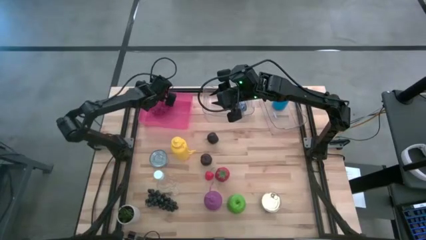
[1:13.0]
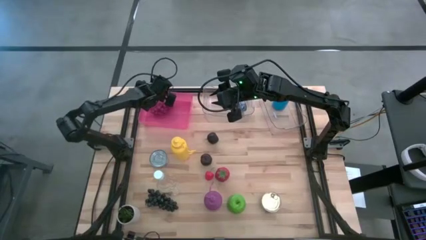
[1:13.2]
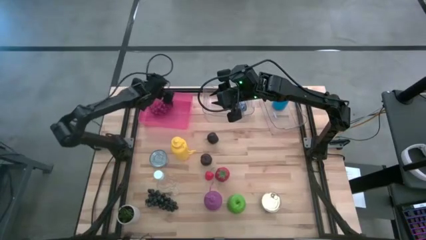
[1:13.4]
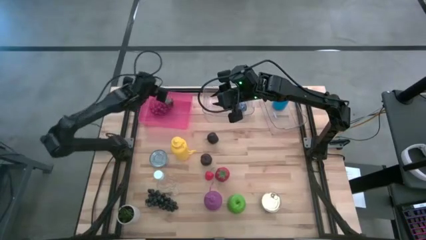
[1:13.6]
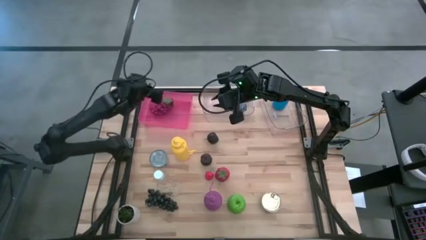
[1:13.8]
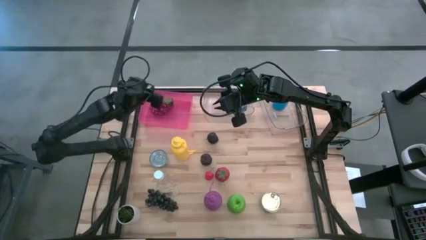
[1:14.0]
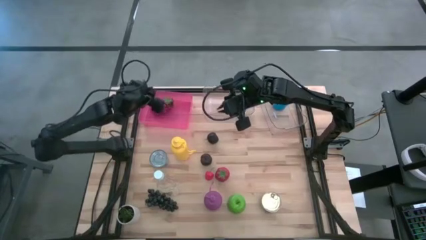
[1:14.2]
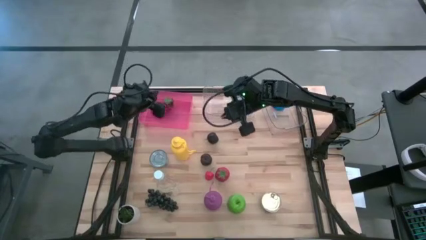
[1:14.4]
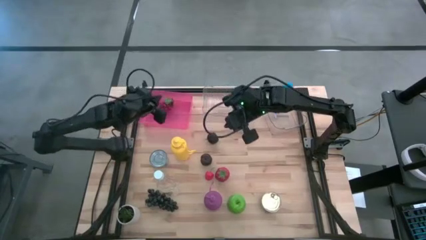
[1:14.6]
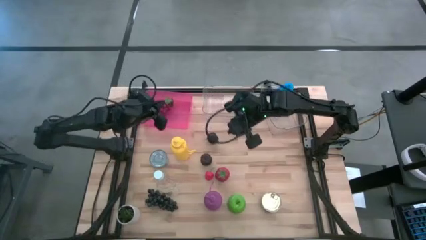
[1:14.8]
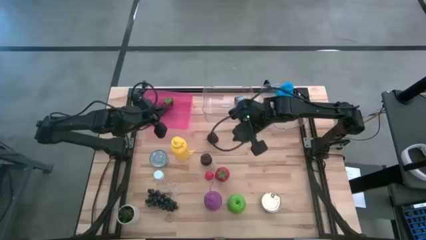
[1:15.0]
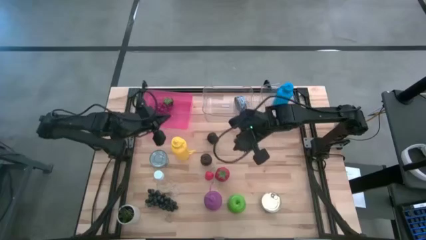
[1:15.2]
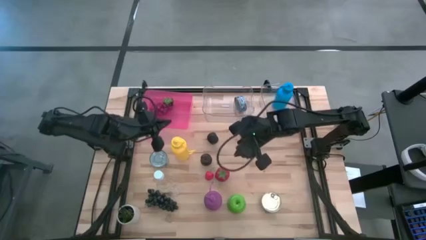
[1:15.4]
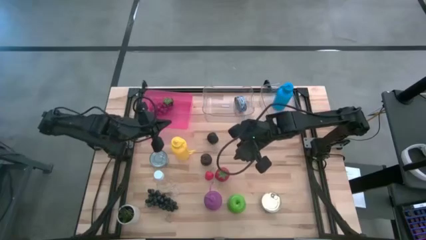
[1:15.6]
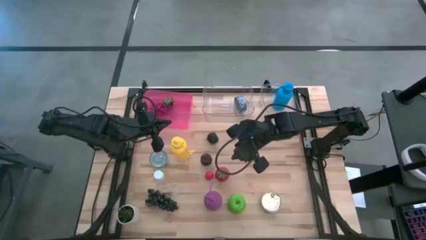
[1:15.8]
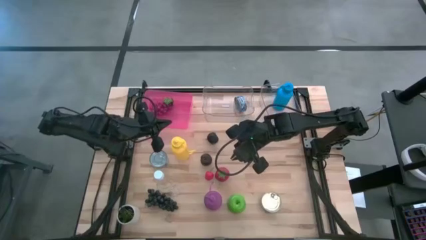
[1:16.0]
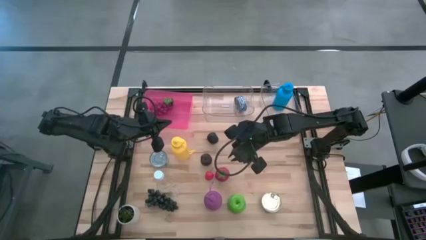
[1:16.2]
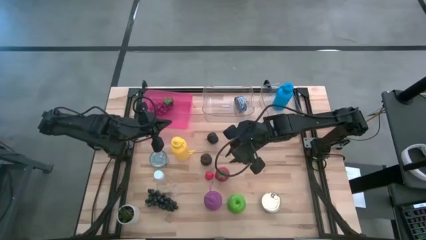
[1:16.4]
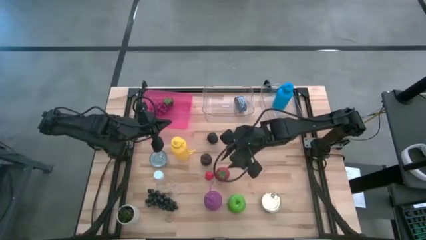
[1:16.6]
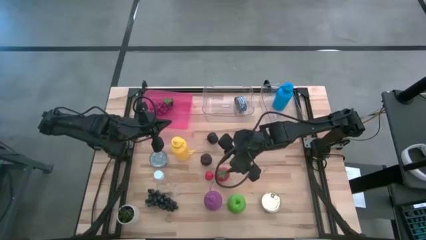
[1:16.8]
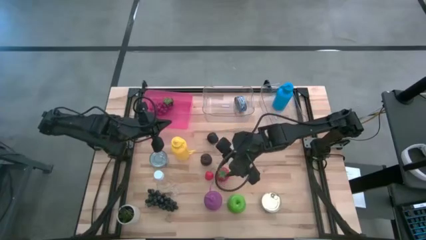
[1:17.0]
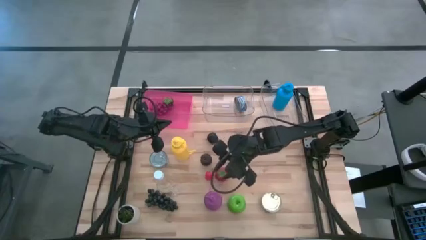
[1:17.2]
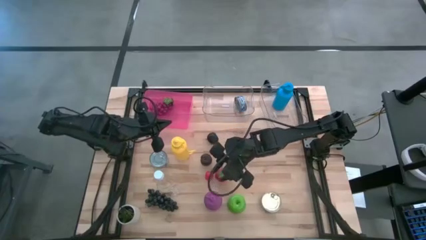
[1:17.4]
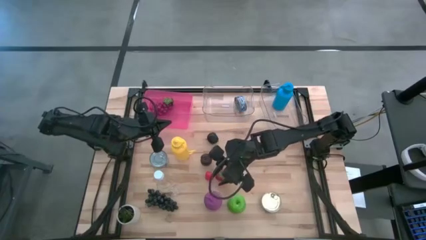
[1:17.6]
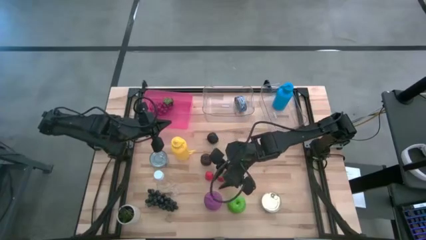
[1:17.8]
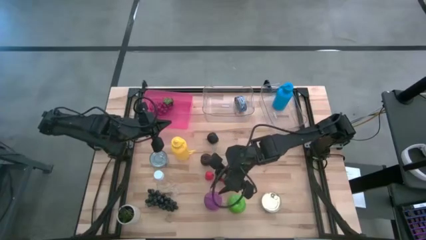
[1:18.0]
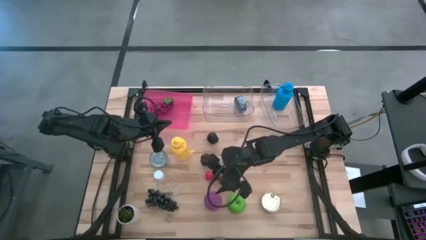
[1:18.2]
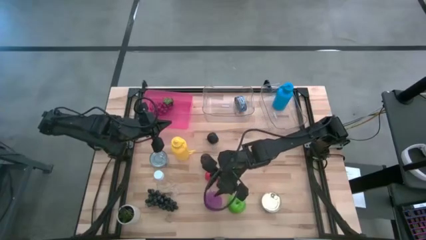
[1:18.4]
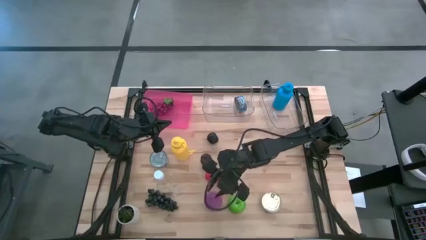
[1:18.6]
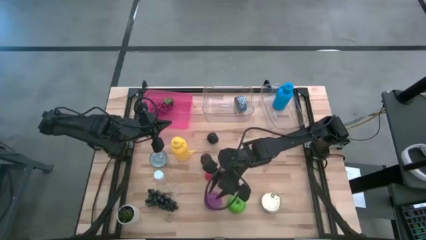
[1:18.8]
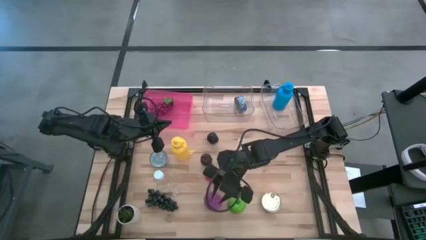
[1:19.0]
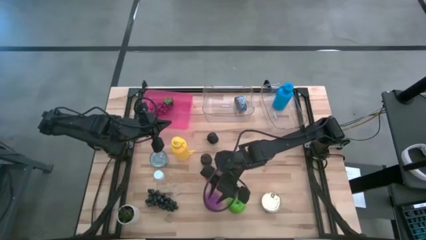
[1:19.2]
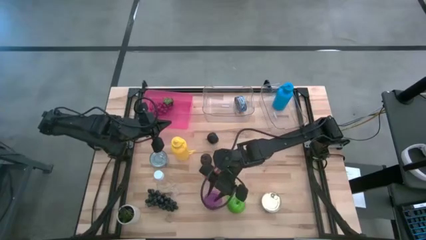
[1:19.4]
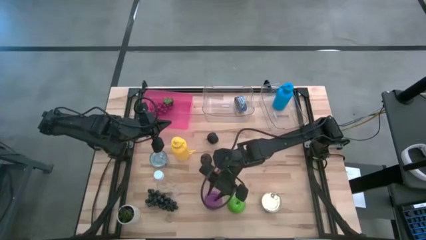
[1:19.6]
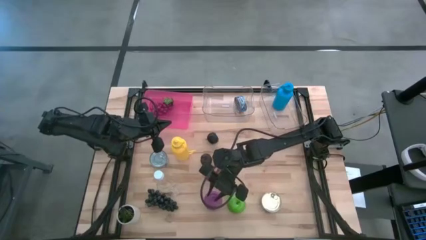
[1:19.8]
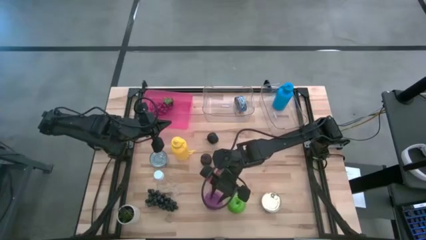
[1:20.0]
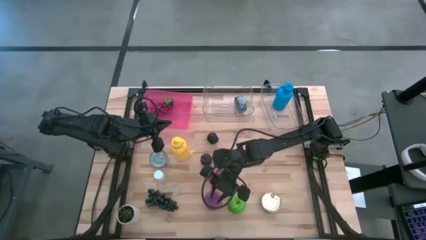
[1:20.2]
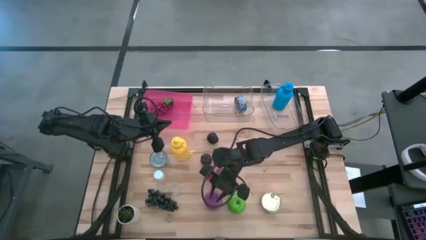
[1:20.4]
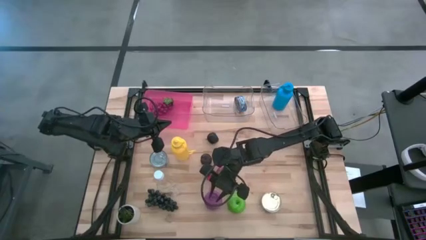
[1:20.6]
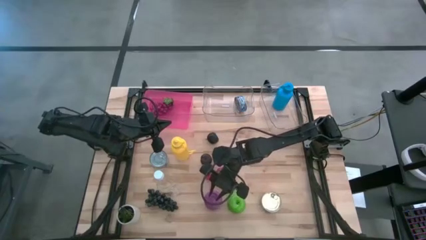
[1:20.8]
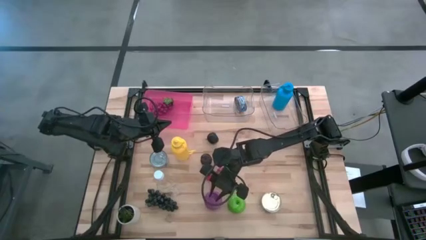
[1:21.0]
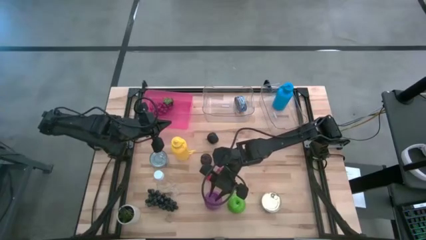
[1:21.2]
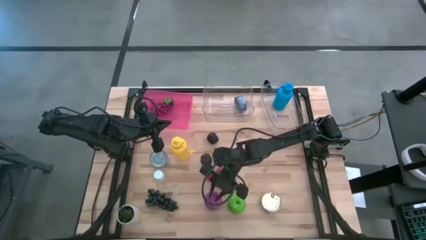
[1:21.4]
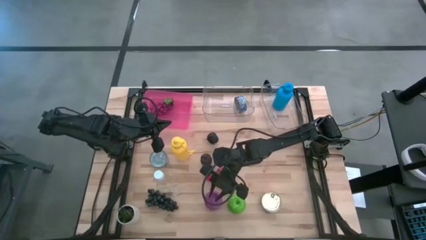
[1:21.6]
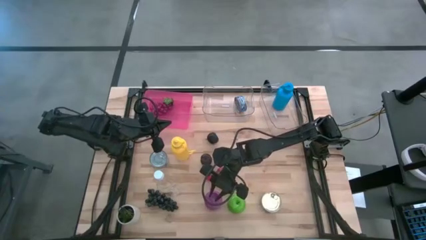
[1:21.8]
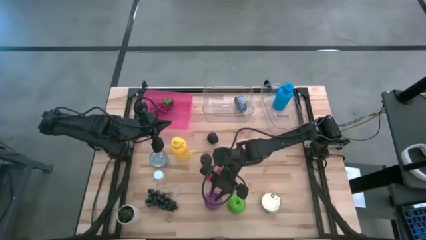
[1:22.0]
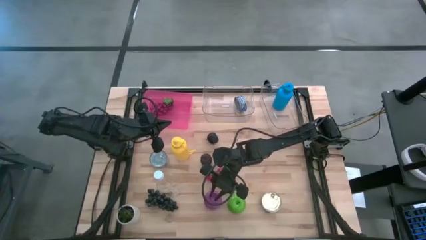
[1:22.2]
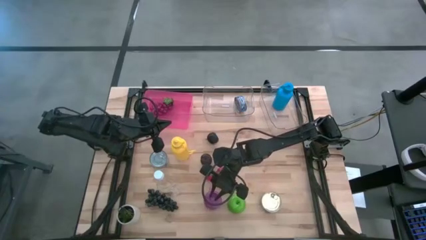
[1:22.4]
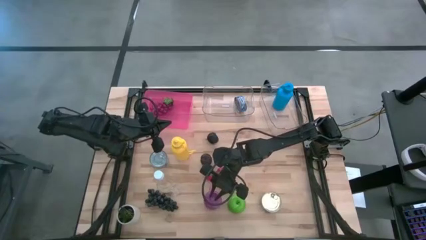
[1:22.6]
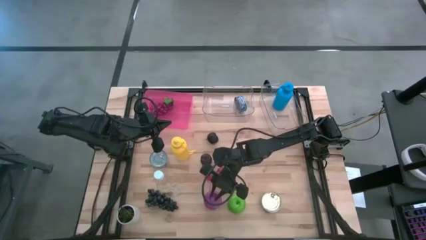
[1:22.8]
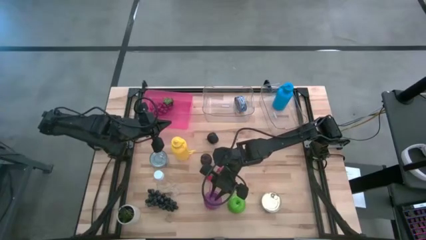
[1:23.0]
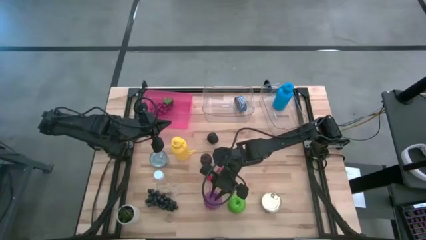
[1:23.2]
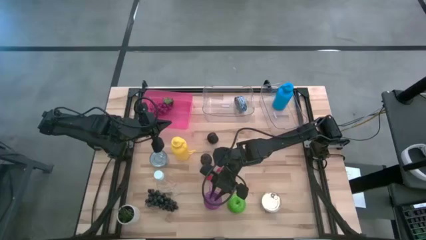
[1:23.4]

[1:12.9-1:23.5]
Task: Pick & Place Food Item
Put the purple water bottle into the right transparent bin

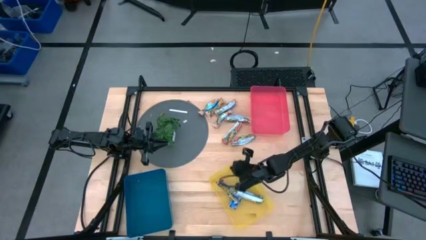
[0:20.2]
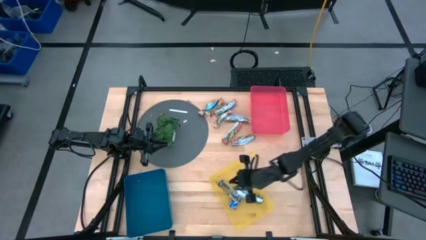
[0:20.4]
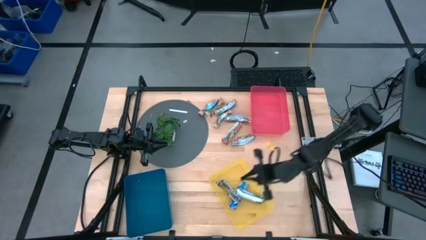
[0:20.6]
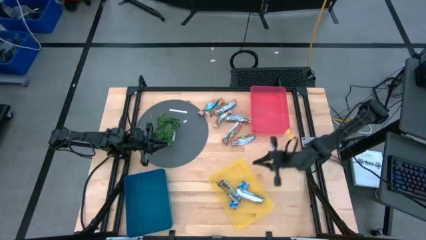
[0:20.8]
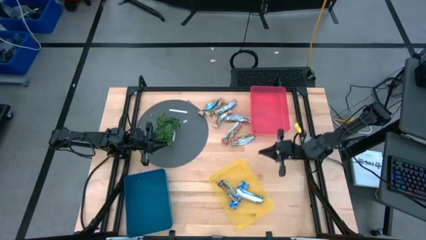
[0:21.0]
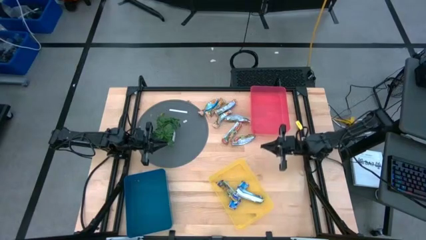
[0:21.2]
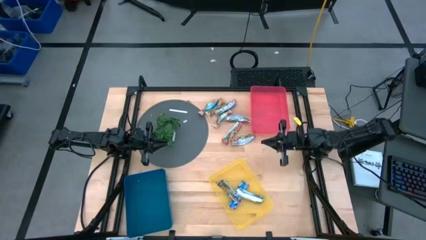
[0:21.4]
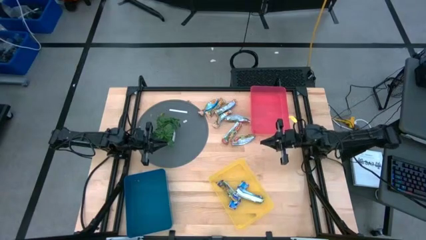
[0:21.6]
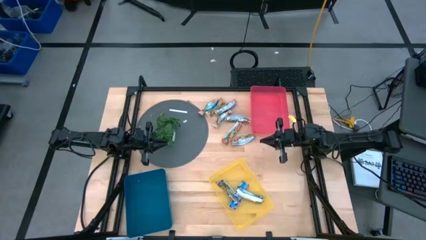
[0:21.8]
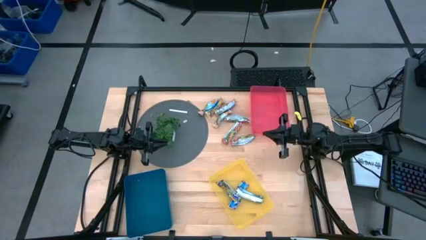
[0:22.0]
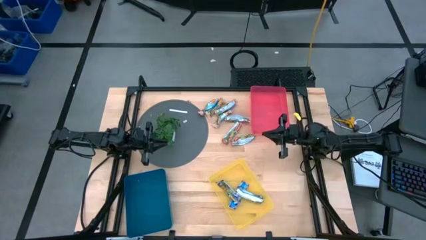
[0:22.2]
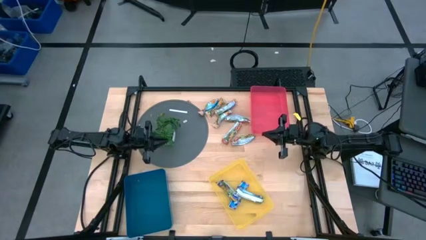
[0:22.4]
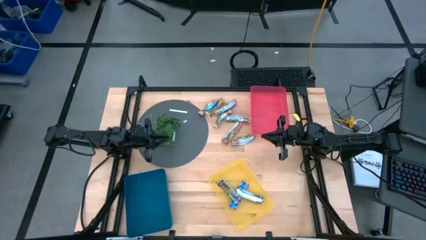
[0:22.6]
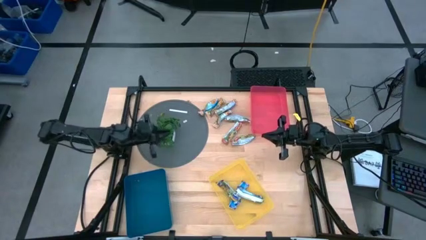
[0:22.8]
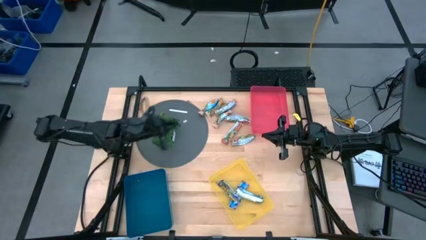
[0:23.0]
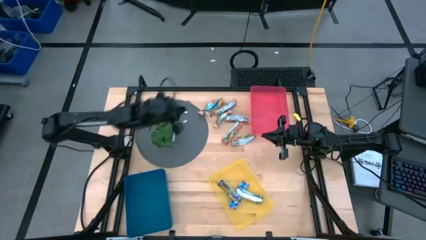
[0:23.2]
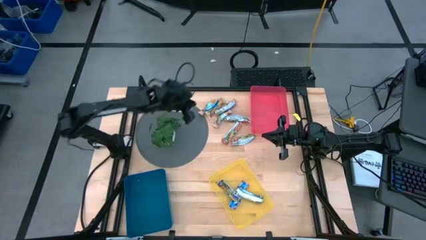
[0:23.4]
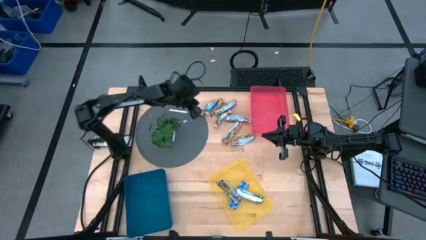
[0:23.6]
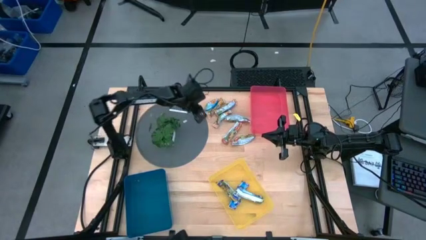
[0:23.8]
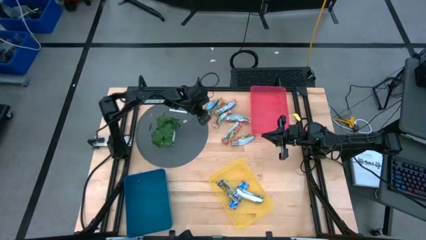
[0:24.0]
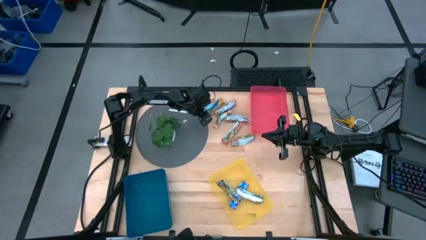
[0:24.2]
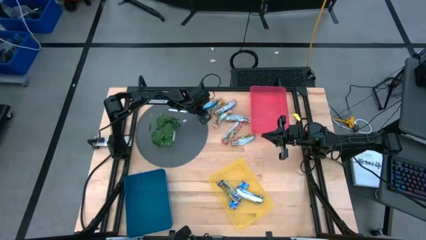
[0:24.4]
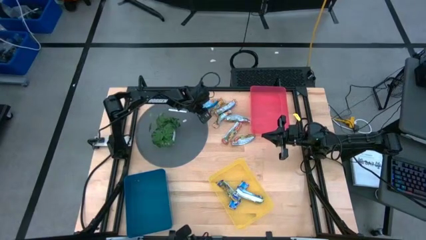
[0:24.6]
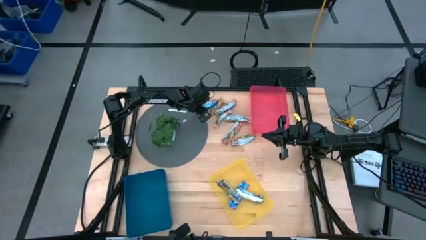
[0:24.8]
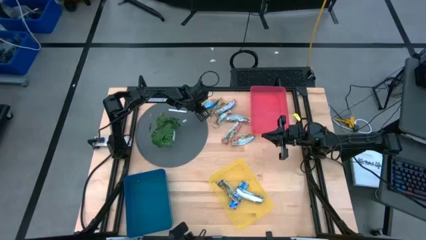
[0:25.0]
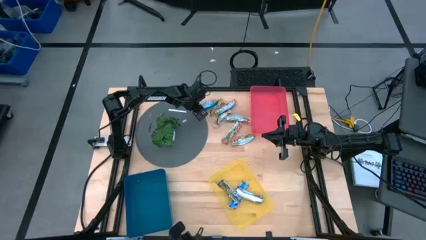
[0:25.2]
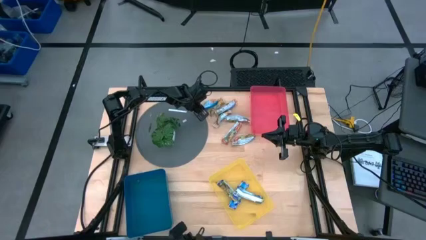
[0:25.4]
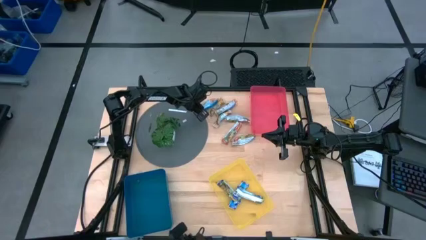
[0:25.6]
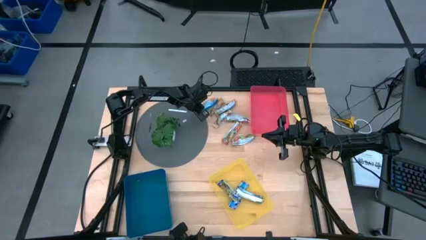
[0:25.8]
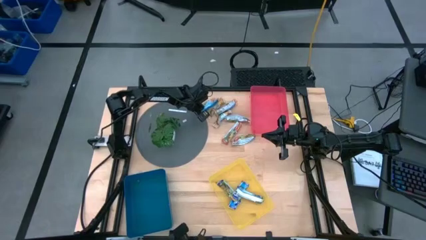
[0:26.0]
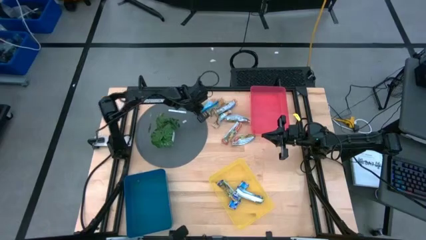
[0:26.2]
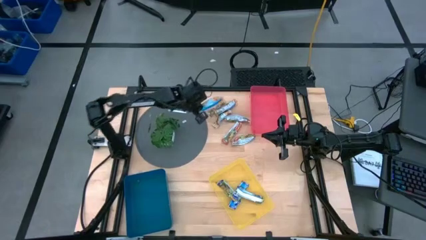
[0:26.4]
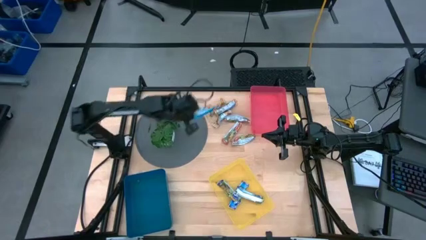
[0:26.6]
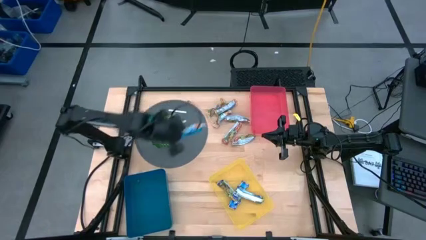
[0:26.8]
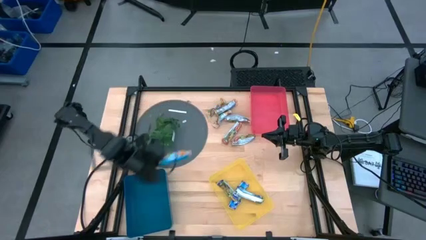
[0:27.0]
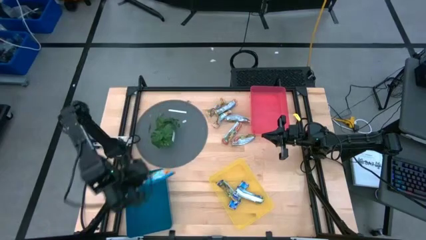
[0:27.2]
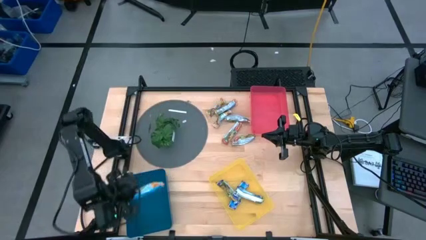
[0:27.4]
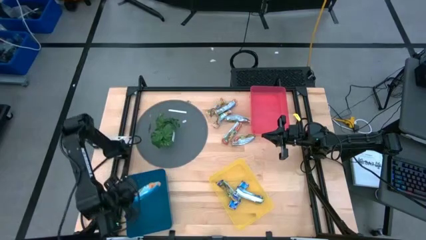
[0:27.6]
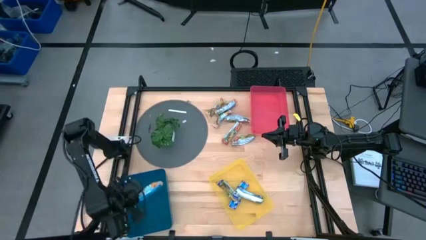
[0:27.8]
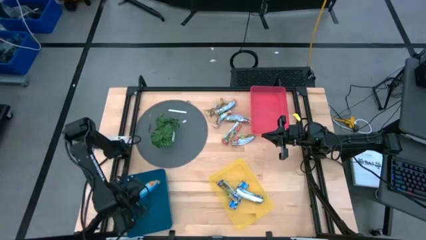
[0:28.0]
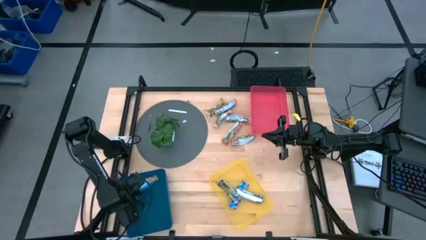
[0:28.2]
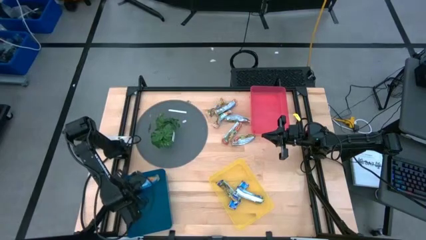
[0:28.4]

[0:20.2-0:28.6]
Task: Pick and place Granola Bars by type
Put the yellow snack into the blue bin
